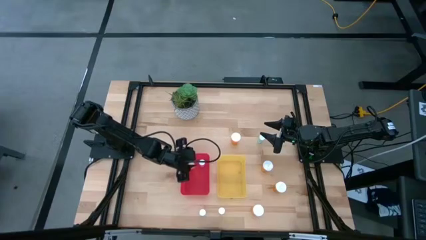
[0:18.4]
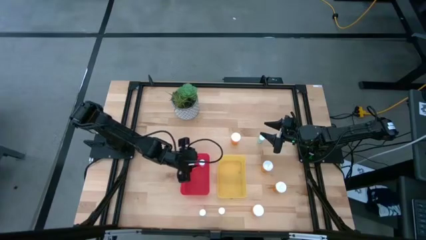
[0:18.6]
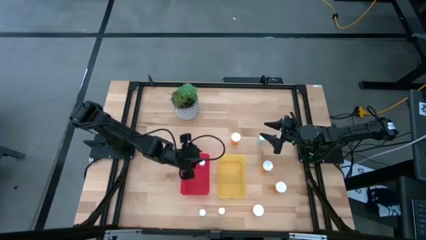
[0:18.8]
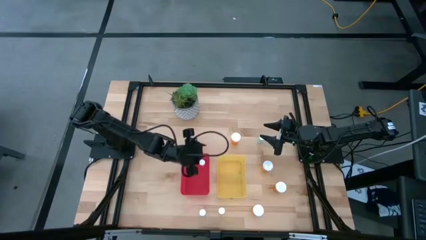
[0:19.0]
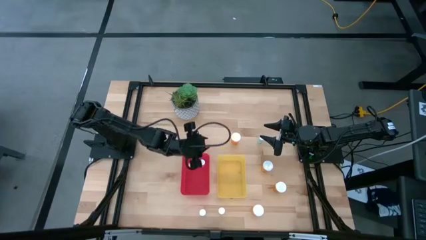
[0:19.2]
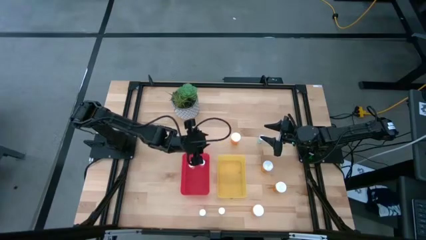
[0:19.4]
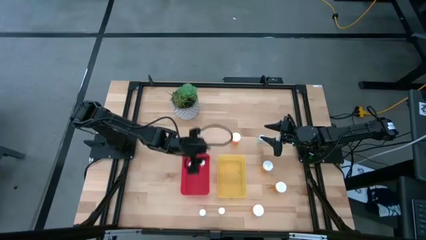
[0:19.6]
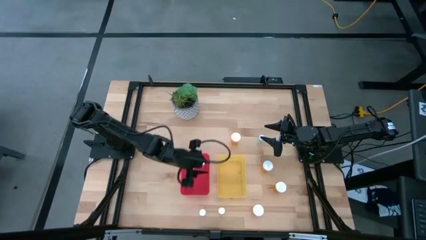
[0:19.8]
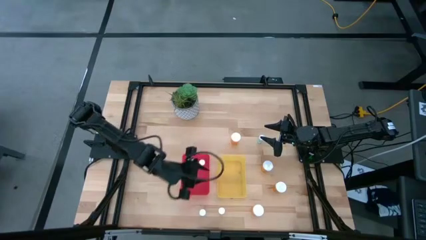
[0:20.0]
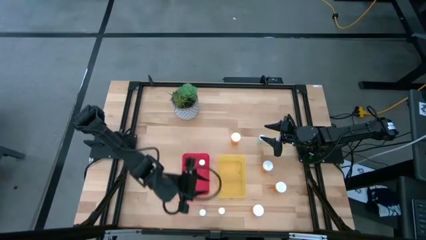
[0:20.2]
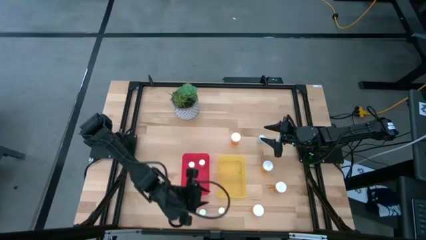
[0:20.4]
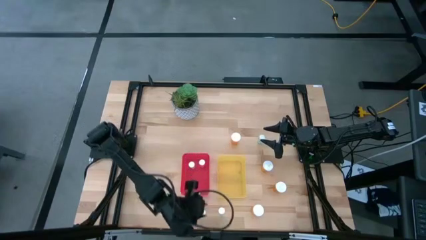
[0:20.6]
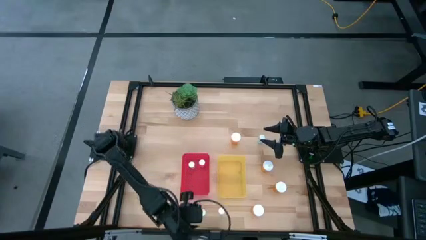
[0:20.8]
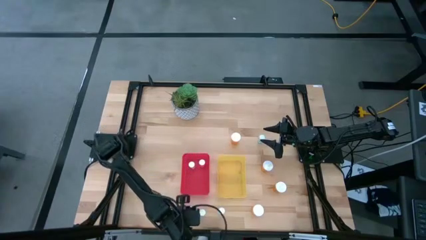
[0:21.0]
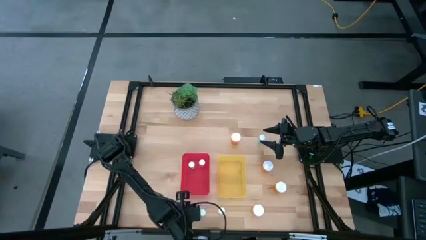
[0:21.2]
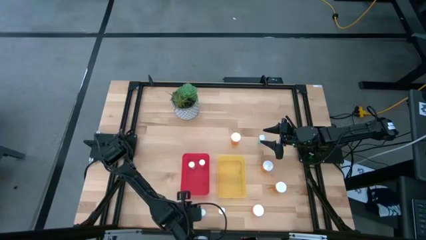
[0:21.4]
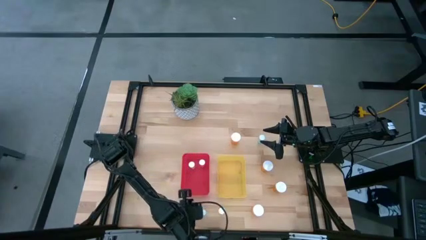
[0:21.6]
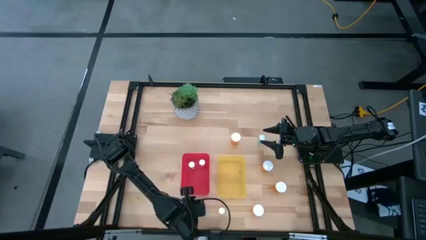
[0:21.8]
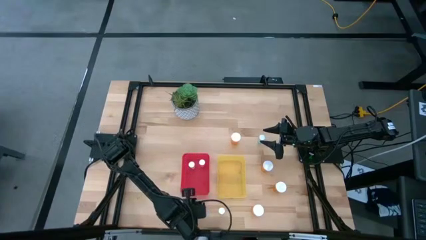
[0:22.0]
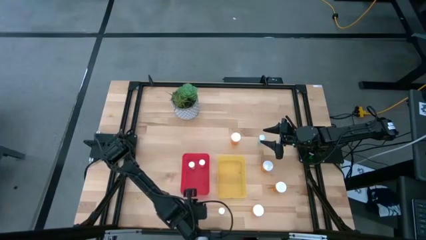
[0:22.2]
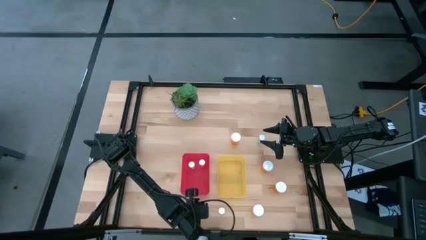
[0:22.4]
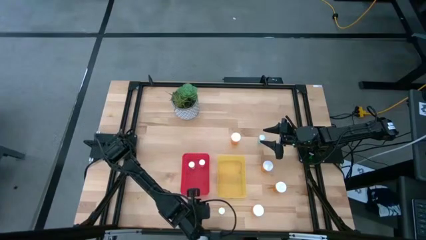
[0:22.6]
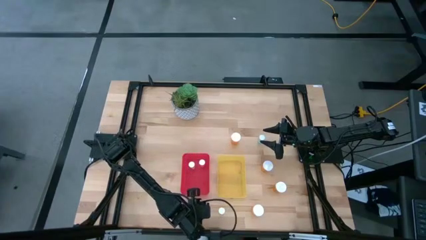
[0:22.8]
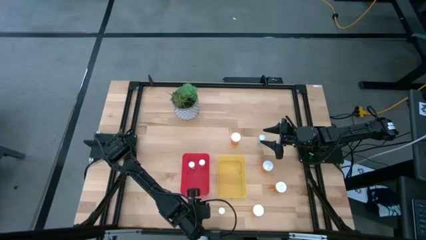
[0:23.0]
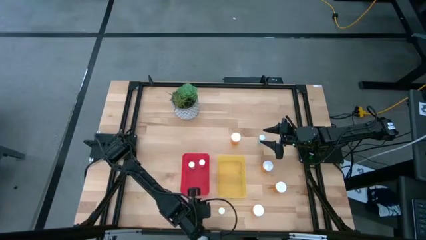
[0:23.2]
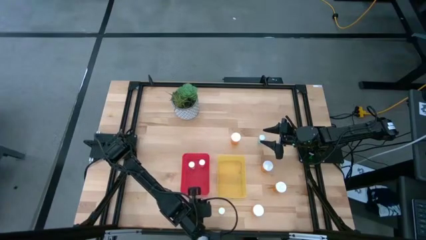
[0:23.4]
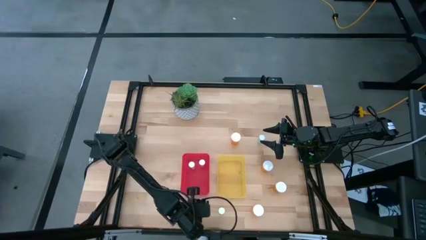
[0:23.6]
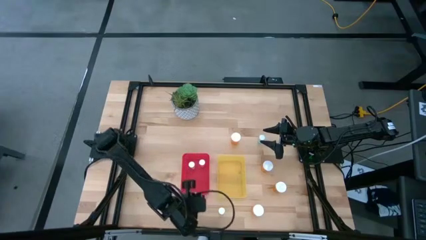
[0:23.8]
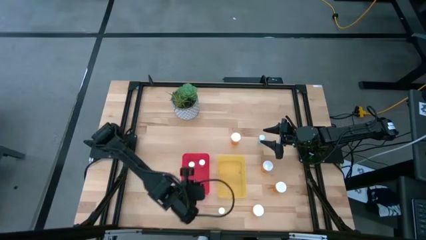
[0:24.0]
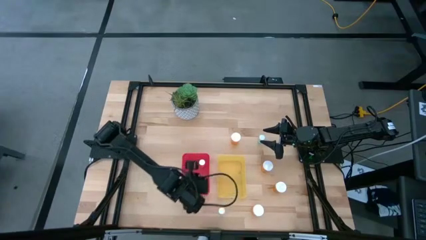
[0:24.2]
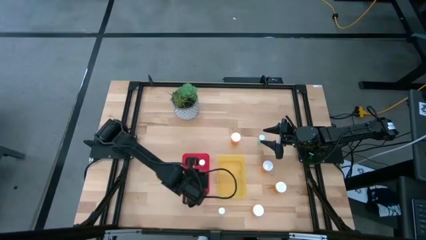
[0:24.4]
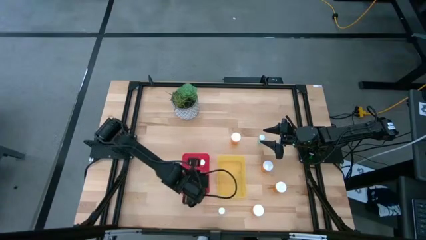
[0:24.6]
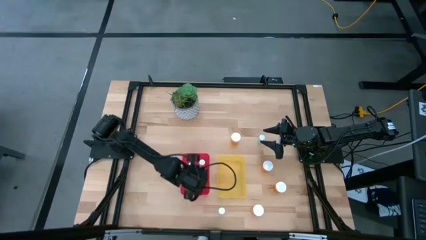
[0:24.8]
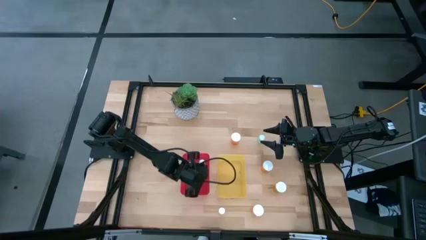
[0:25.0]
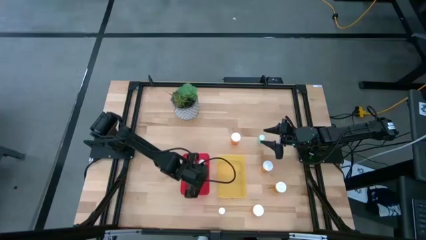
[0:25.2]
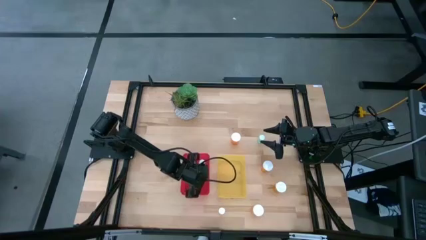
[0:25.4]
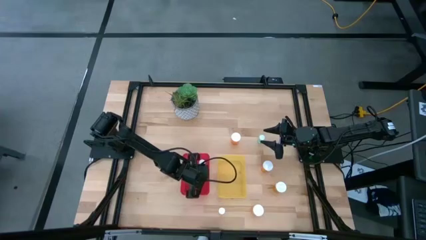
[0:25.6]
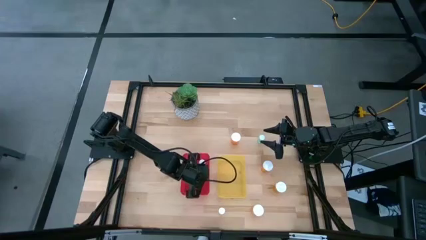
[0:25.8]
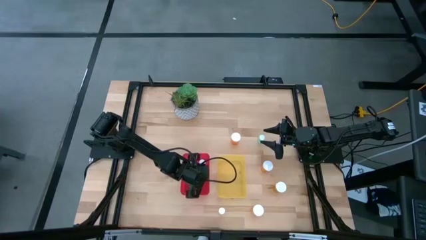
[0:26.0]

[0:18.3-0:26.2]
Task: Pick and place medicine bottles into bin by pill shape (circle, oval)
Put the blue tablet bottle into the red bin

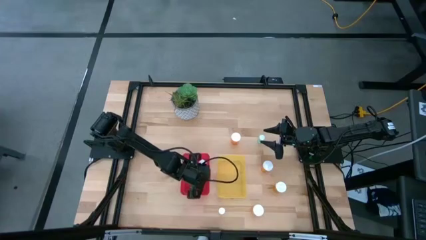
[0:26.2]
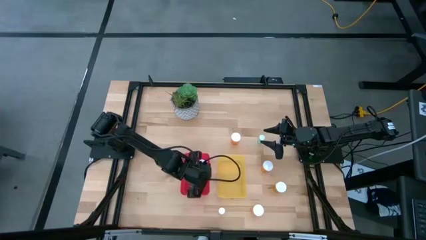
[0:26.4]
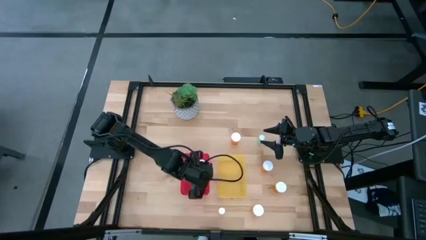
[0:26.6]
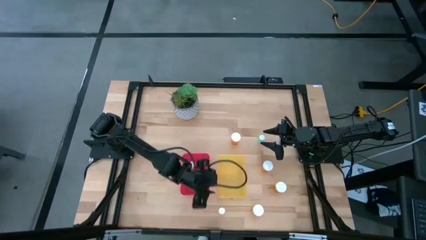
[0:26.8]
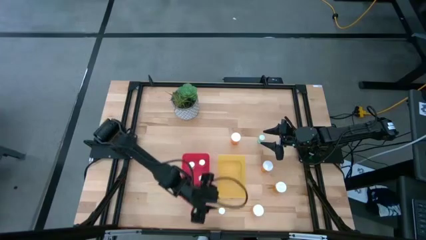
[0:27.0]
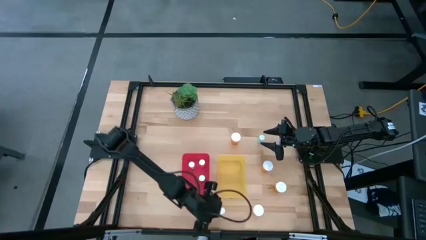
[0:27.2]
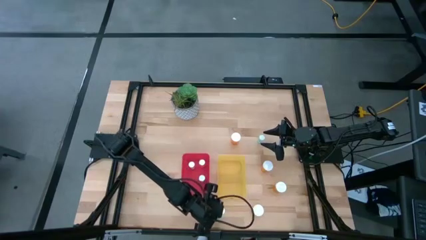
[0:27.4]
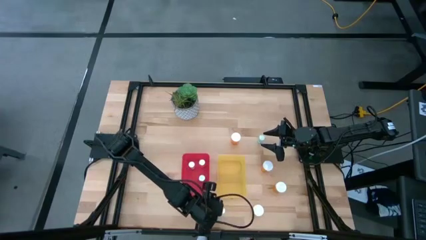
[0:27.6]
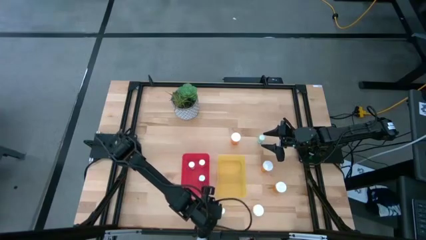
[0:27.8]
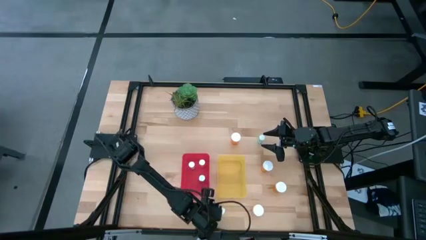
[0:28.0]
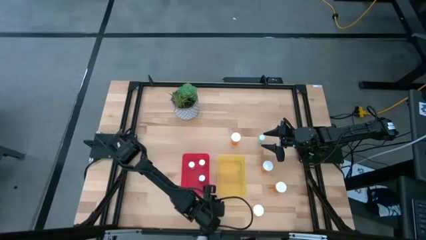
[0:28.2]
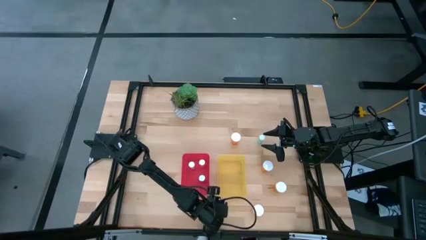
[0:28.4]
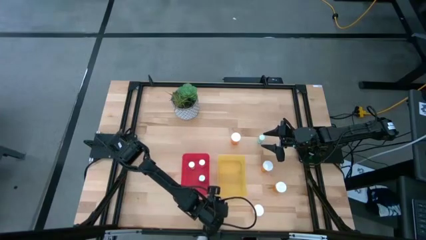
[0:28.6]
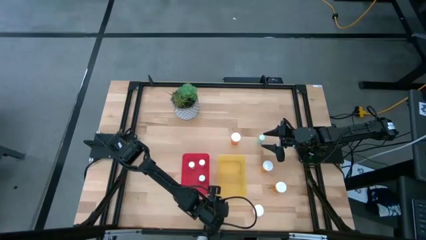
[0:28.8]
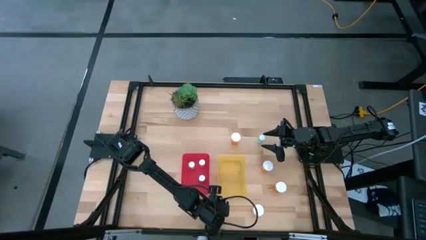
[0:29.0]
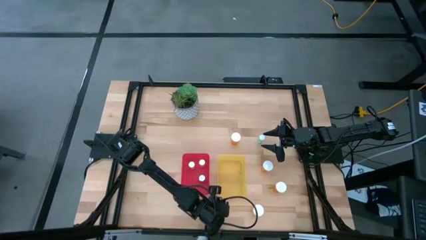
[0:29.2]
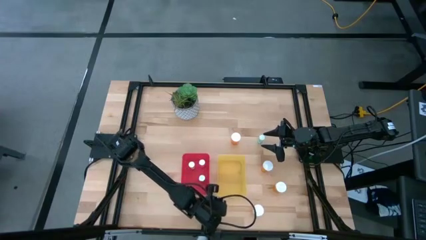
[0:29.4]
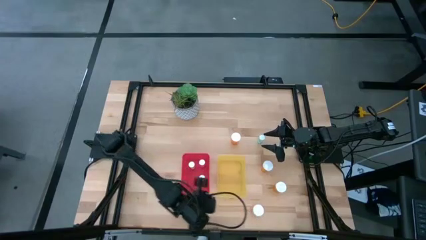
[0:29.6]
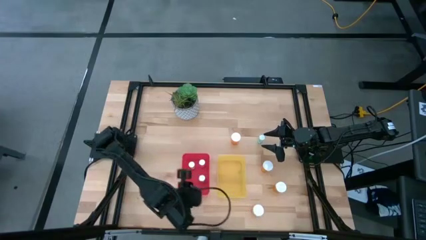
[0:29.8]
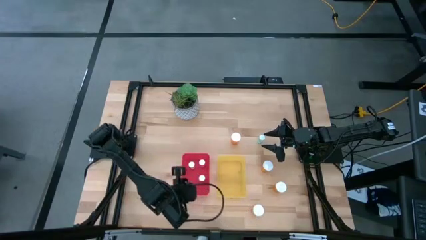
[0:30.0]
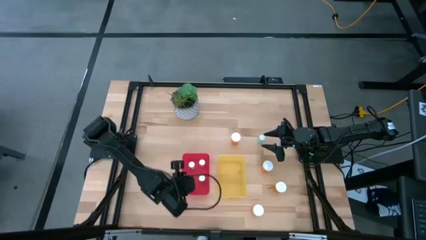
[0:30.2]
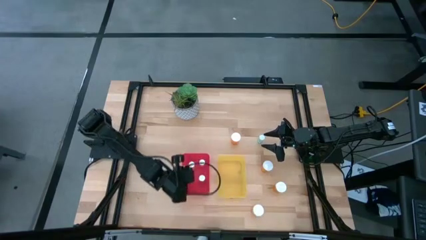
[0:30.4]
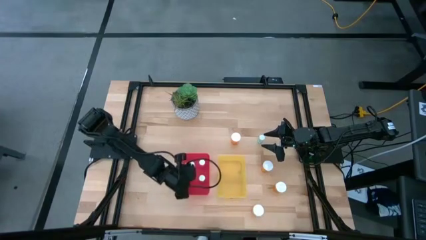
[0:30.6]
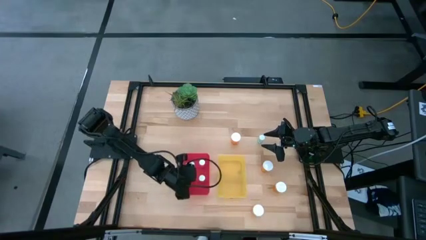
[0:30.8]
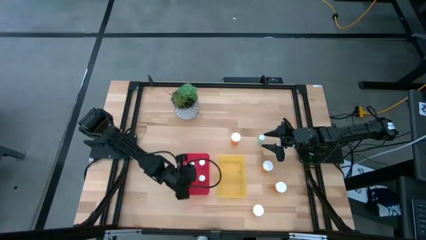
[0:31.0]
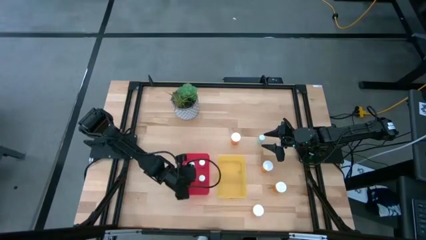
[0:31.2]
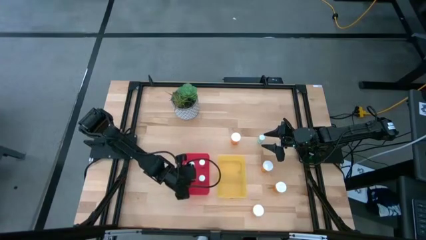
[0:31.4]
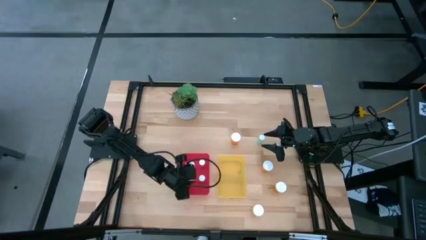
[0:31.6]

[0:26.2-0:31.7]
Put the yellow tablet bottle into the red bin

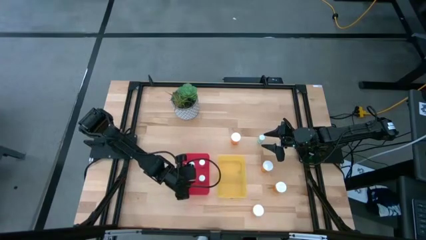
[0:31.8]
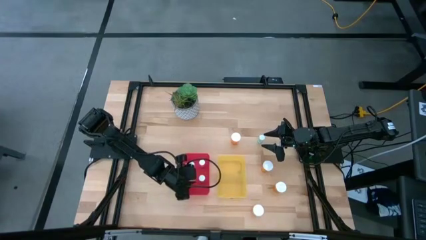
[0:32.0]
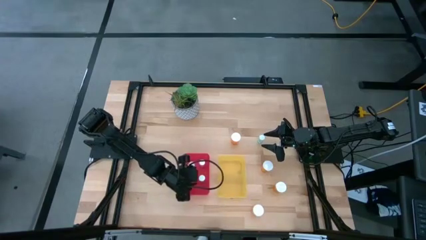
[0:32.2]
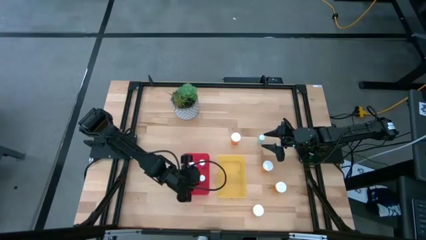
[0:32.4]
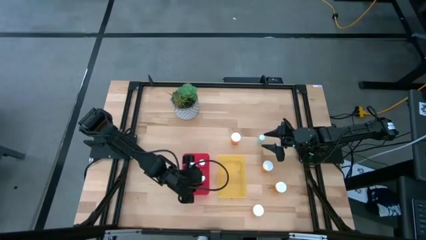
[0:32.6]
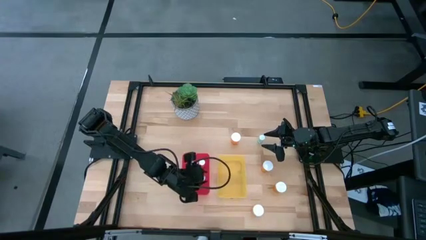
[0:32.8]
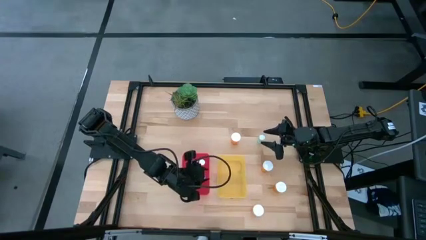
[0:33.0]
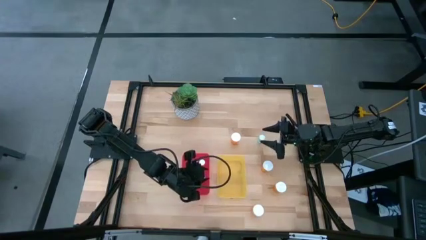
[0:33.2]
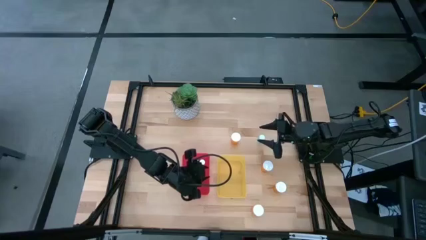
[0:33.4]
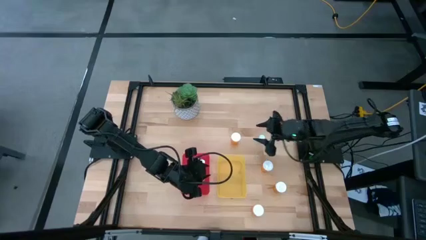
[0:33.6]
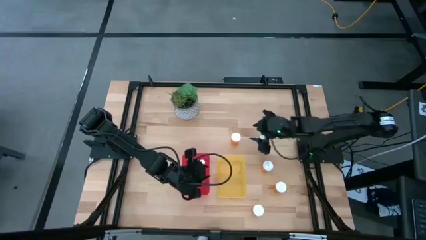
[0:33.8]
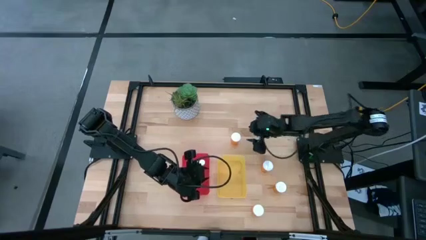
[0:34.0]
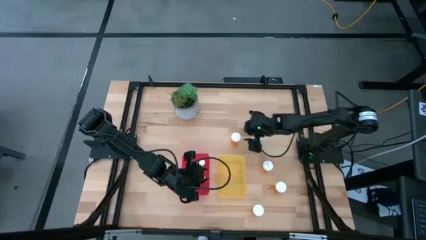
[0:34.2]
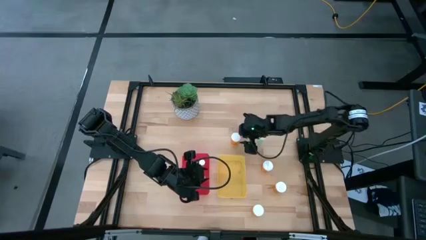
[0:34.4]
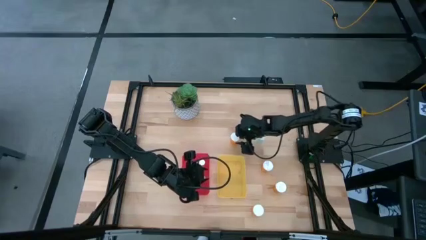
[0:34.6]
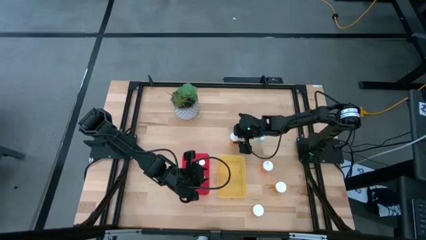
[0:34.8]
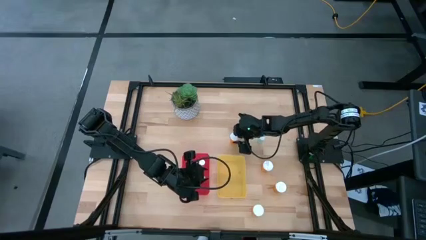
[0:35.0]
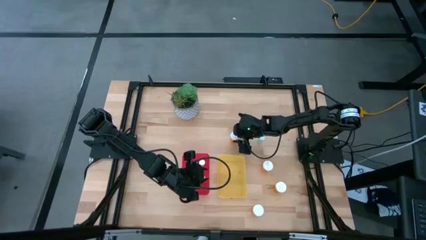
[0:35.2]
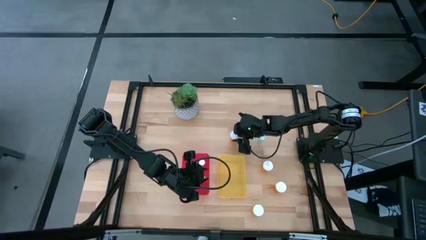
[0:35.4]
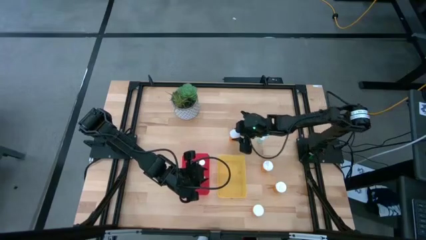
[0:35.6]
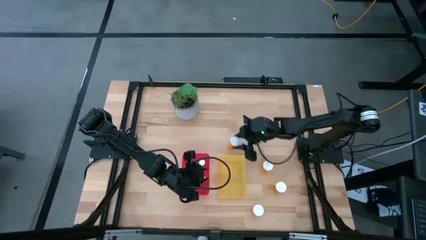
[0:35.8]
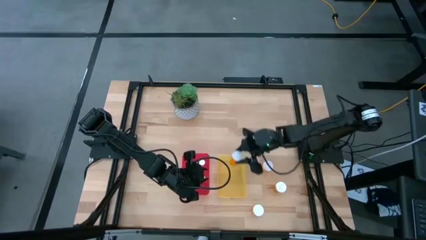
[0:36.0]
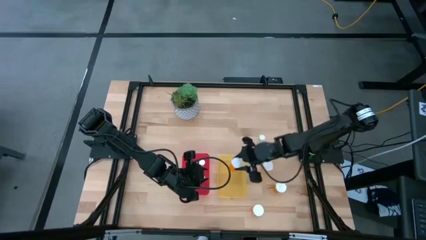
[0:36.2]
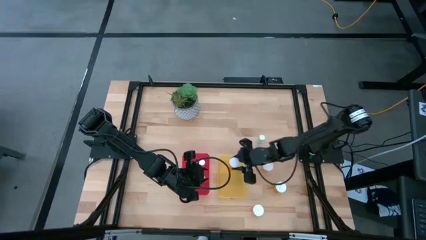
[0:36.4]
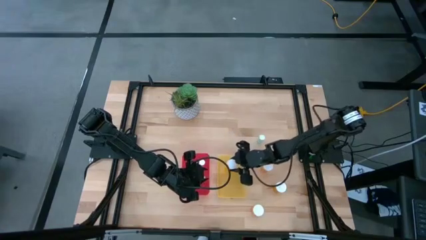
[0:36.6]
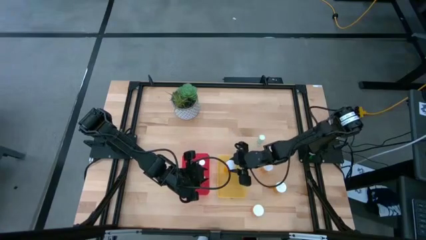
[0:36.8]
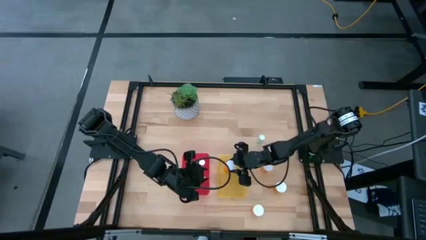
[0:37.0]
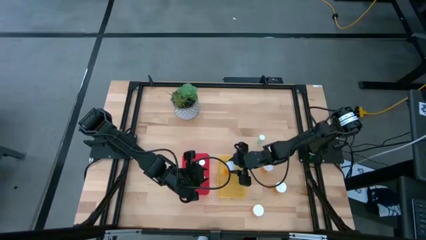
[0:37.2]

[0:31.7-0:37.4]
Put the orange capsule bottle into the yellow bin
